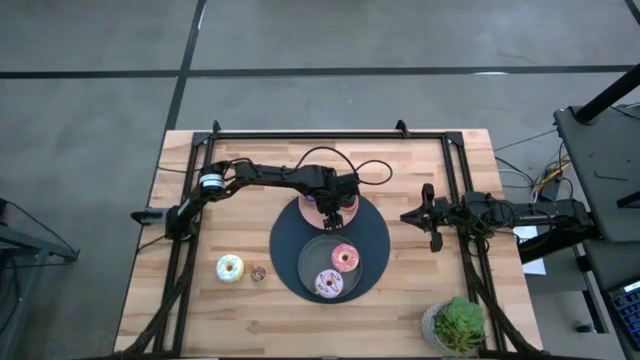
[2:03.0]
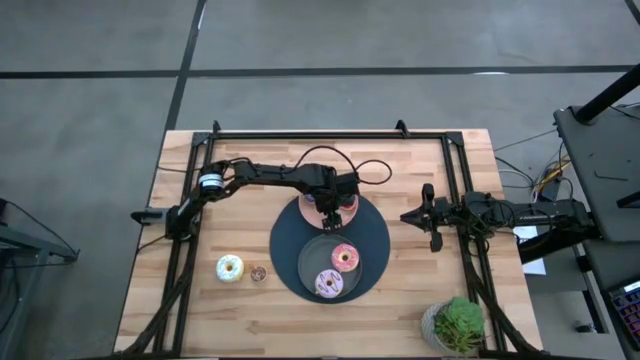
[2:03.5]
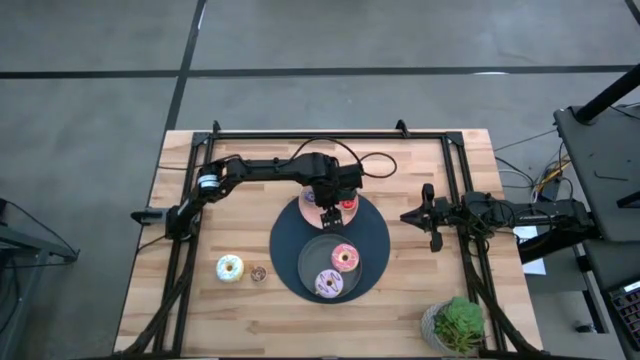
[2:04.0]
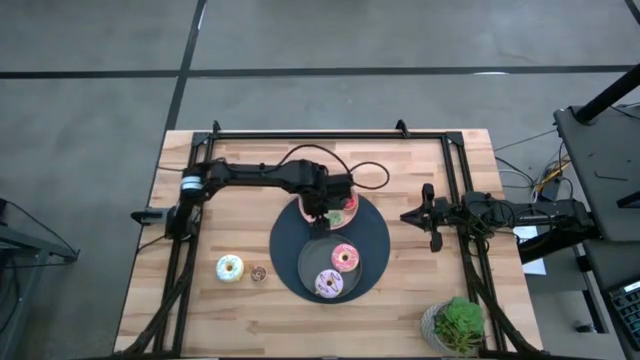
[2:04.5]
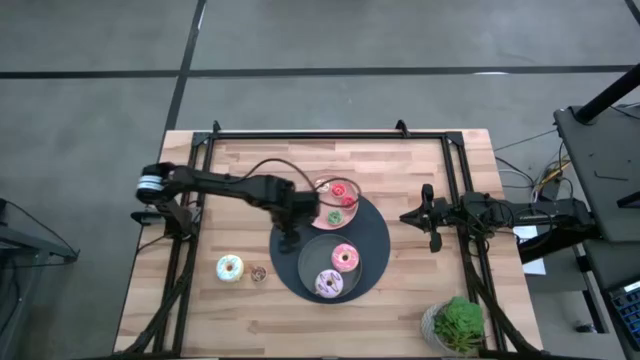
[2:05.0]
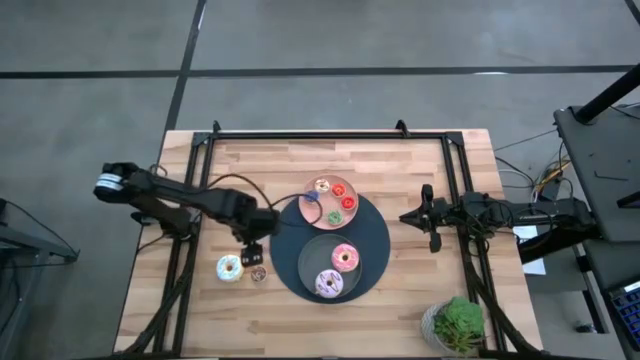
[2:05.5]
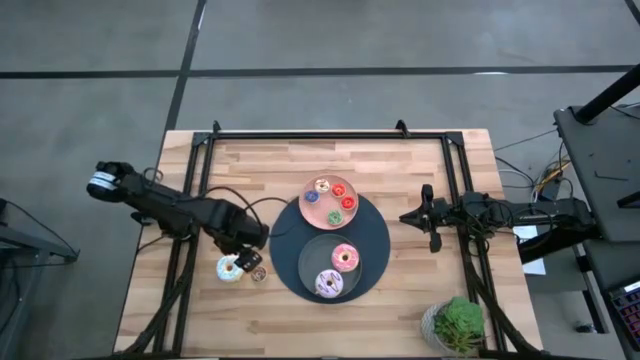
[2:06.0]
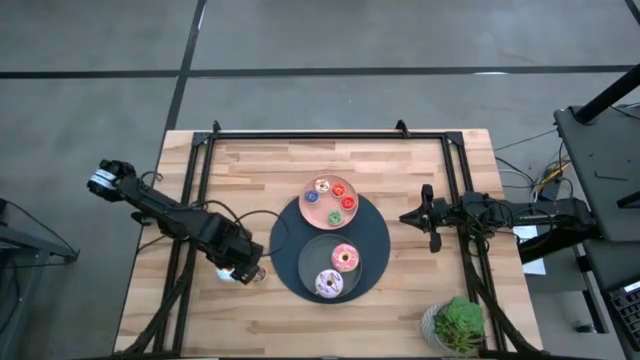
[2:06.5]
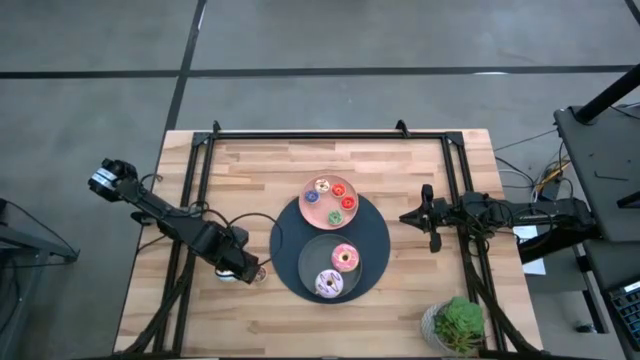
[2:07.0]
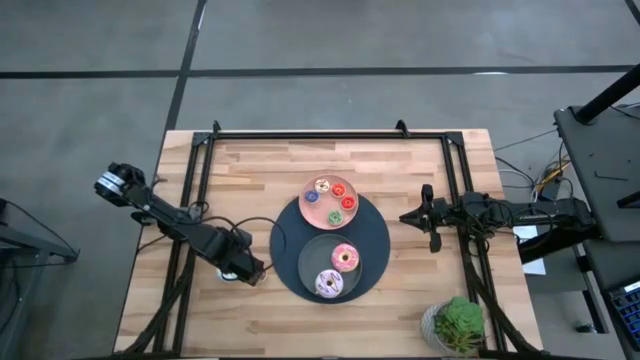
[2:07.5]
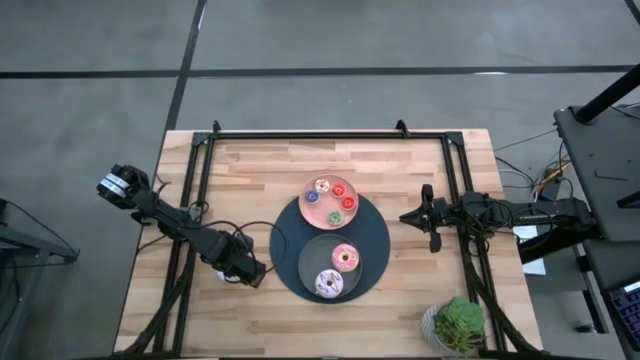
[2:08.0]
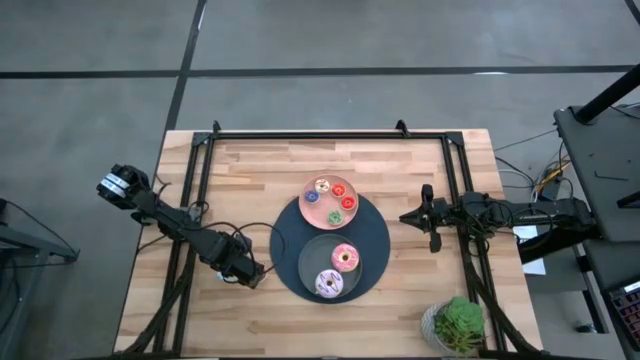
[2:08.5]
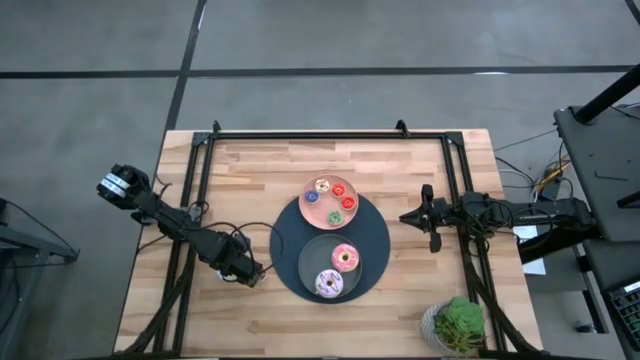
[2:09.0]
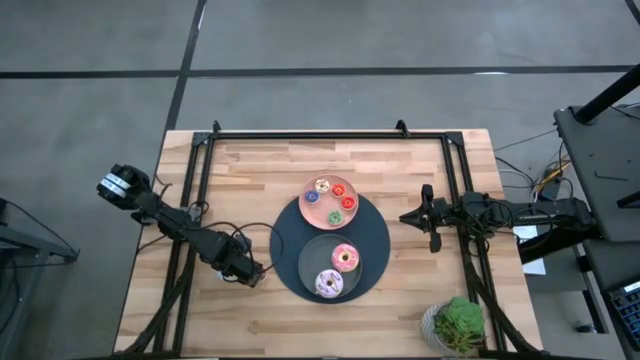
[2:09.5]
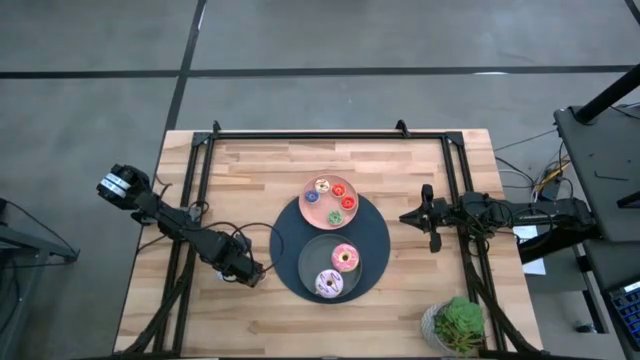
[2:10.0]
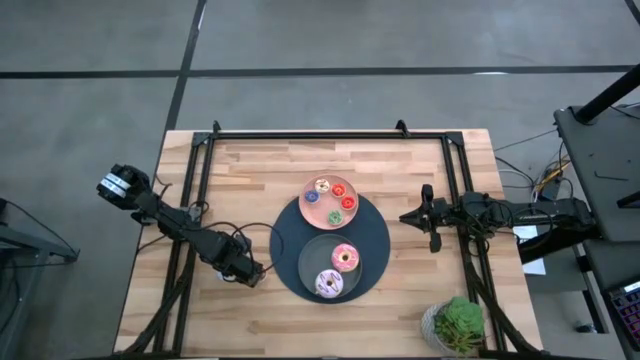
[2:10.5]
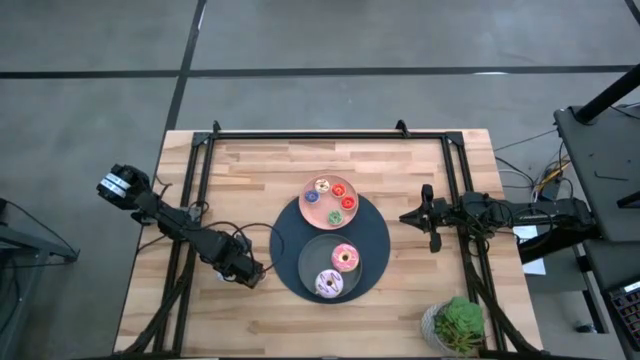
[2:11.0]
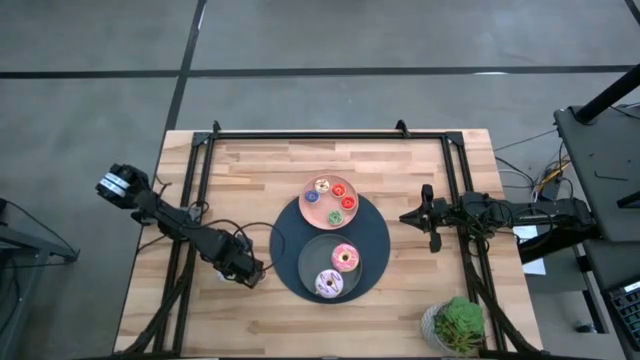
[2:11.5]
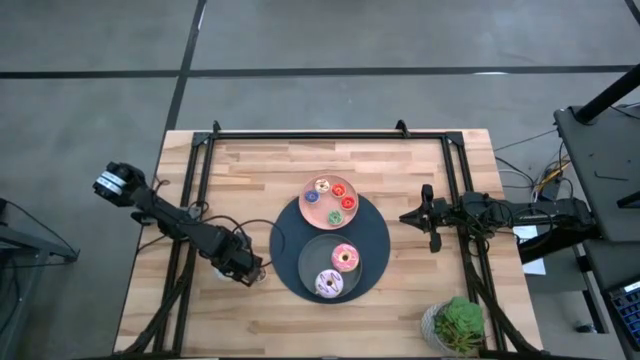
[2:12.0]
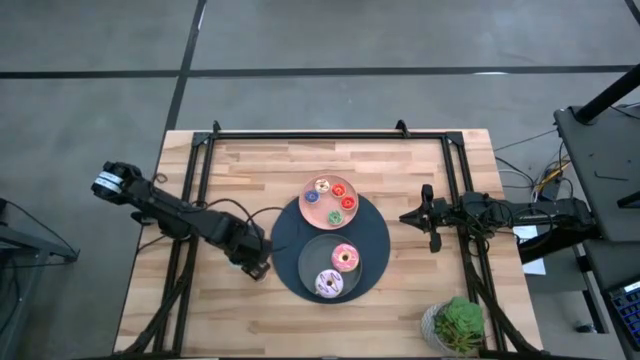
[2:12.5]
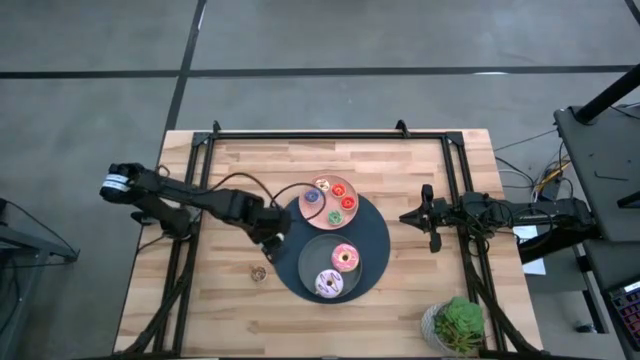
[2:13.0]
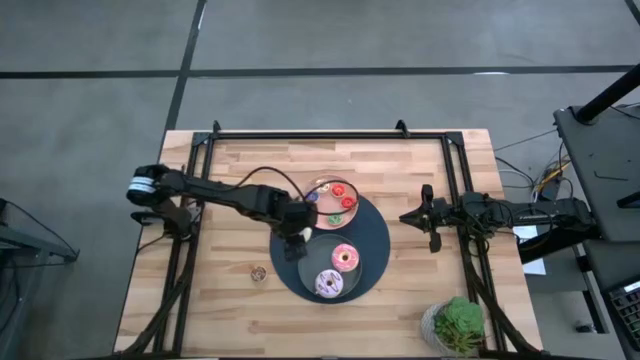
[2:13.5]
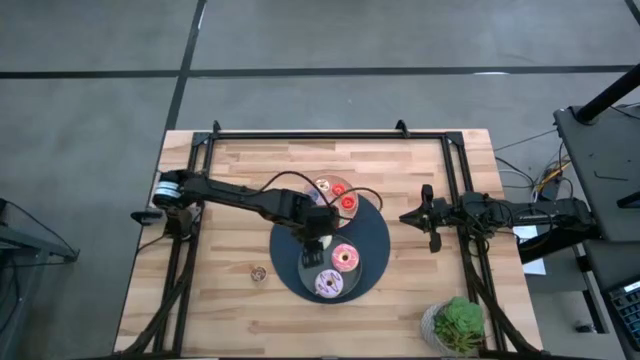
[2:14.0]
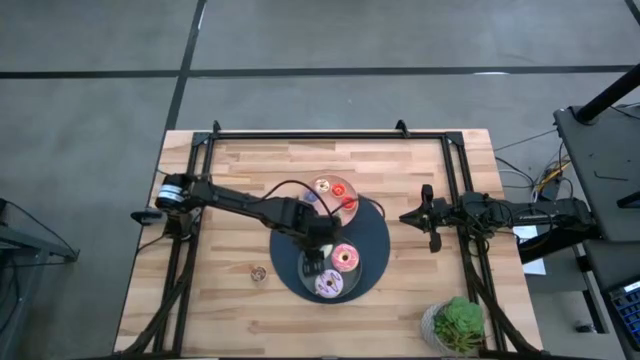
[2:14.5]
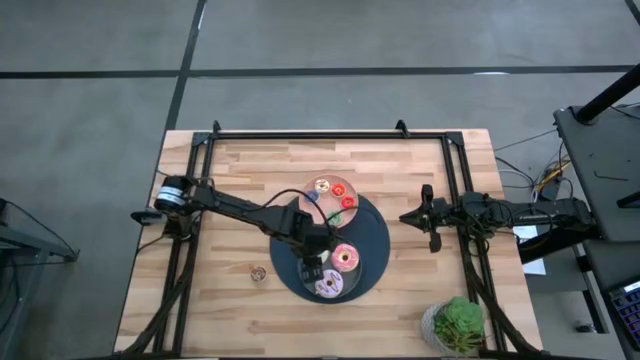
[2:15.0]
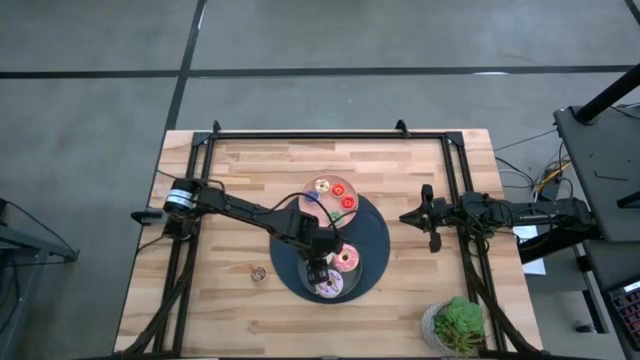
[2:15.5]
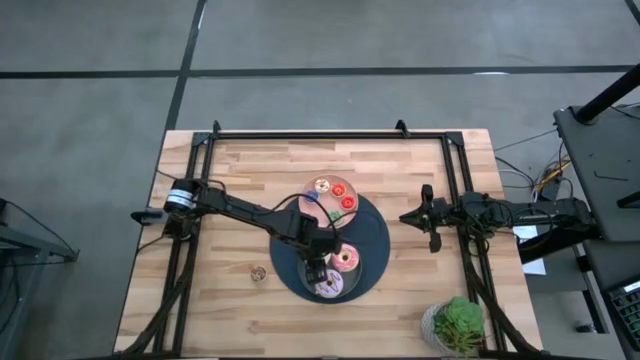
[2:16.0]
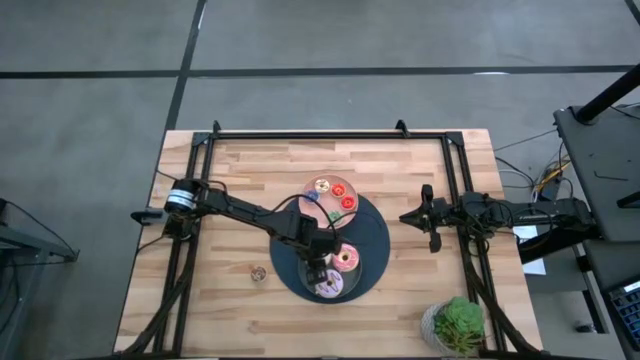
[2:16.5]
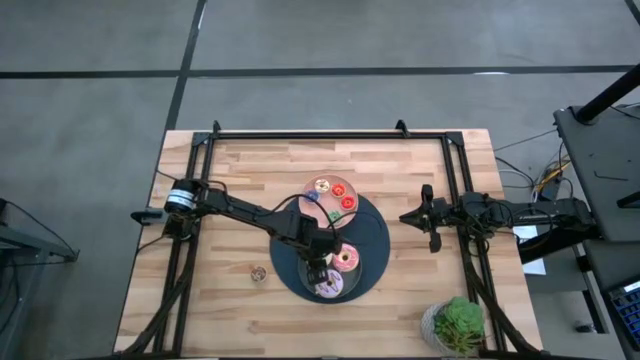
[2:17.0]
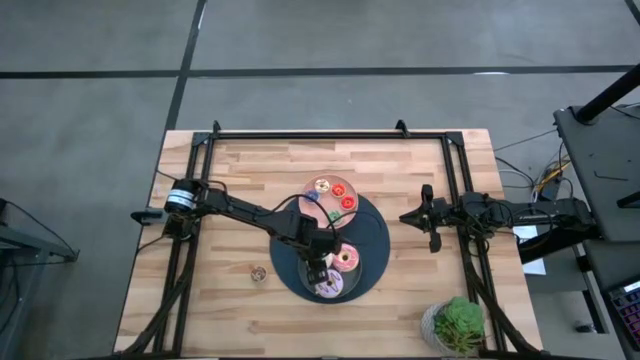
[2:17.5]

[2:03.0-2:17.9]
Task: Pick & Place donuts
Put the large white donut on the gray plate
